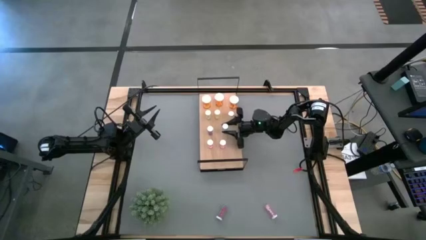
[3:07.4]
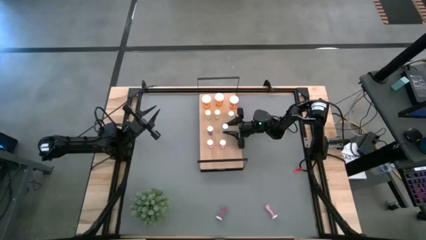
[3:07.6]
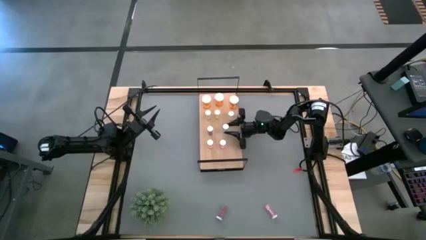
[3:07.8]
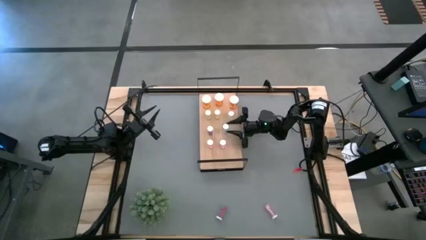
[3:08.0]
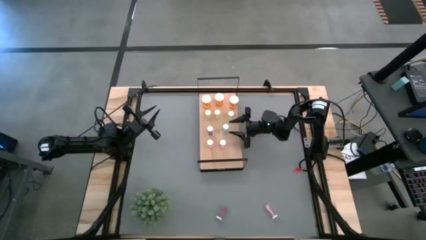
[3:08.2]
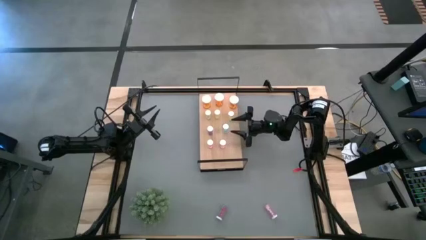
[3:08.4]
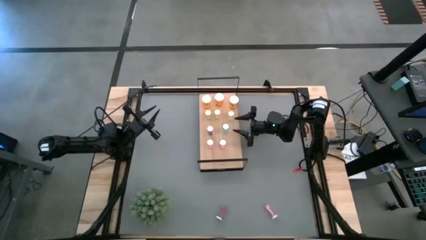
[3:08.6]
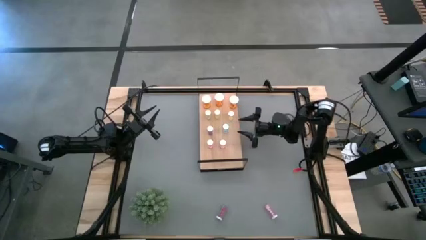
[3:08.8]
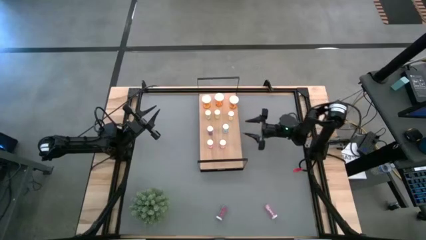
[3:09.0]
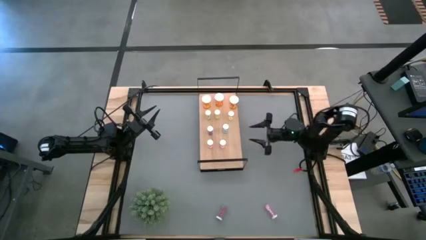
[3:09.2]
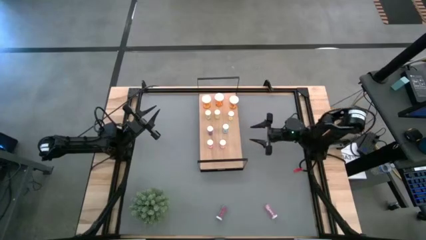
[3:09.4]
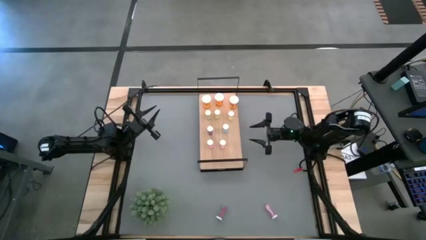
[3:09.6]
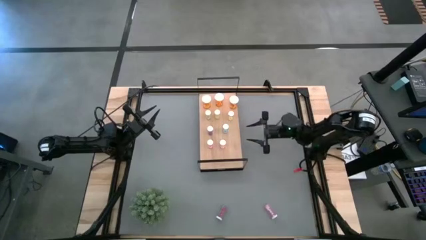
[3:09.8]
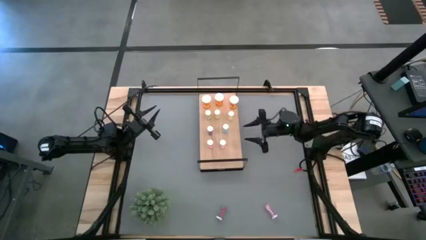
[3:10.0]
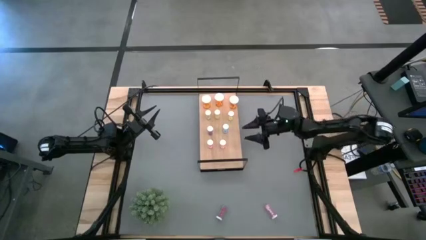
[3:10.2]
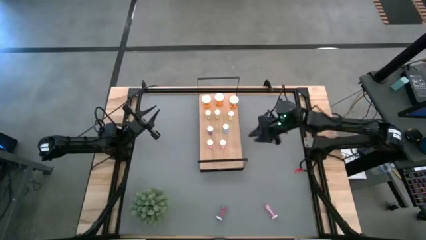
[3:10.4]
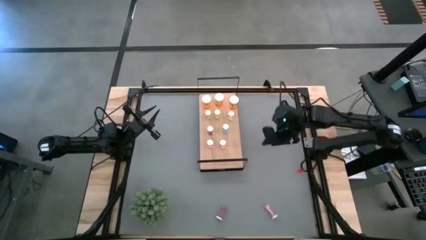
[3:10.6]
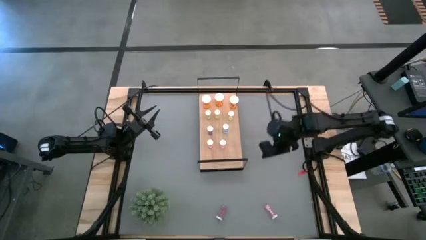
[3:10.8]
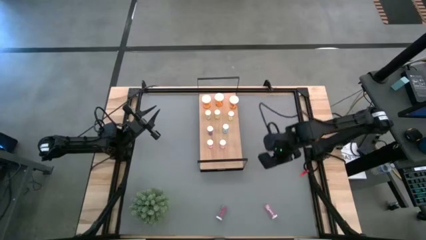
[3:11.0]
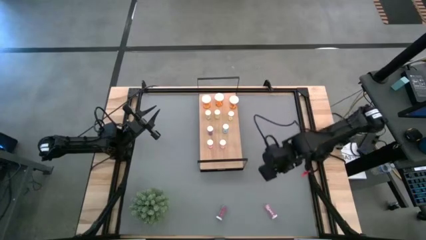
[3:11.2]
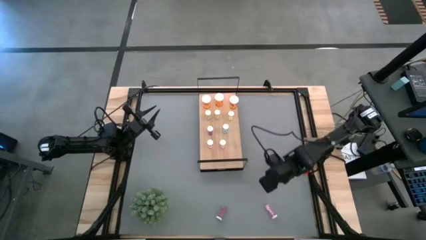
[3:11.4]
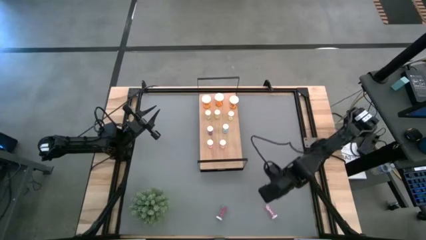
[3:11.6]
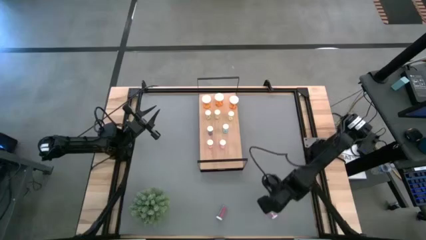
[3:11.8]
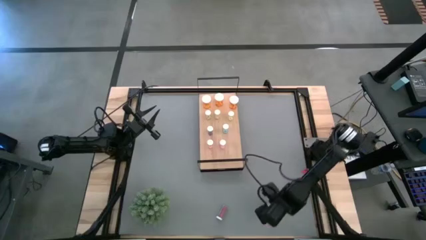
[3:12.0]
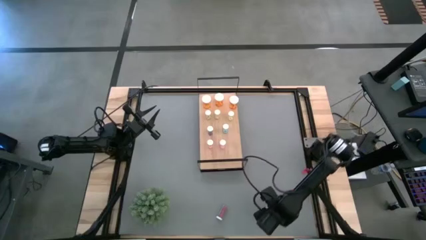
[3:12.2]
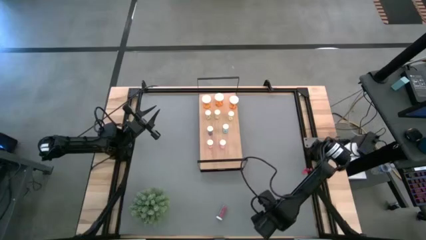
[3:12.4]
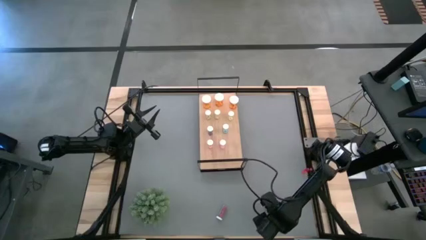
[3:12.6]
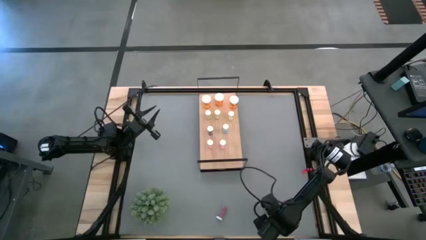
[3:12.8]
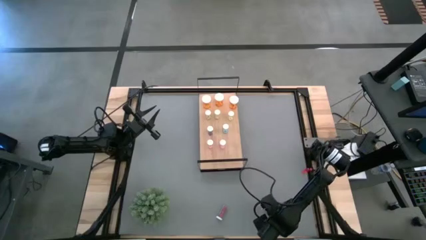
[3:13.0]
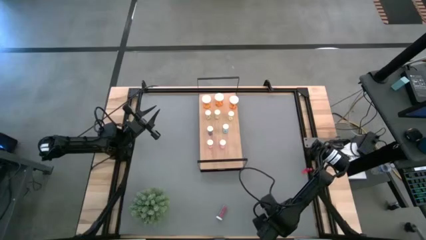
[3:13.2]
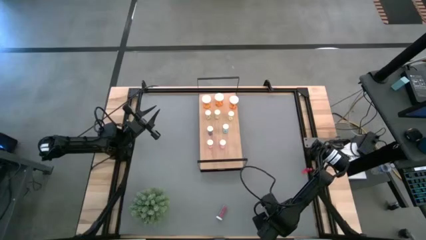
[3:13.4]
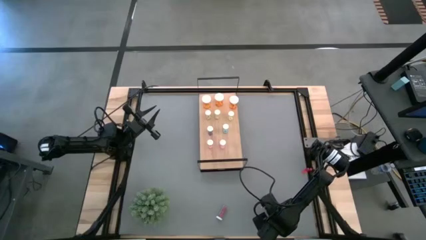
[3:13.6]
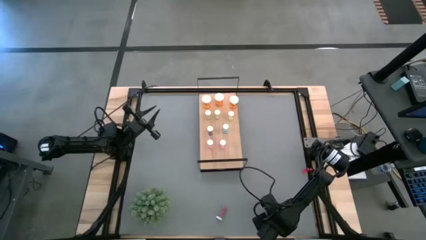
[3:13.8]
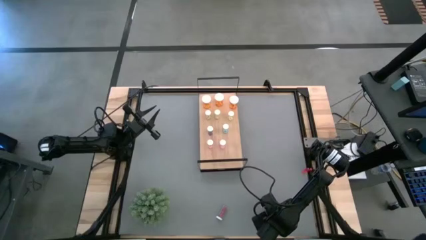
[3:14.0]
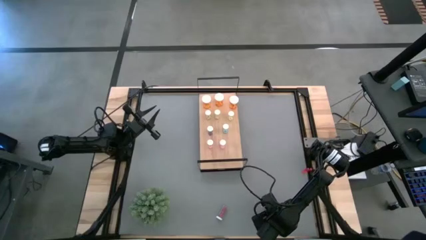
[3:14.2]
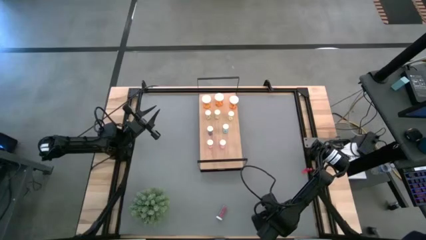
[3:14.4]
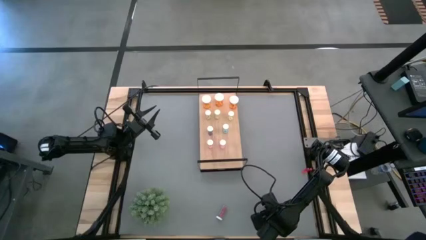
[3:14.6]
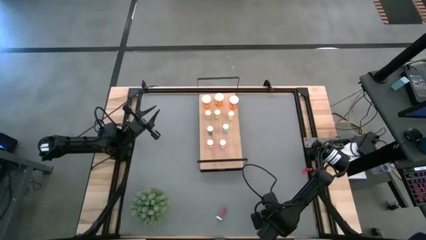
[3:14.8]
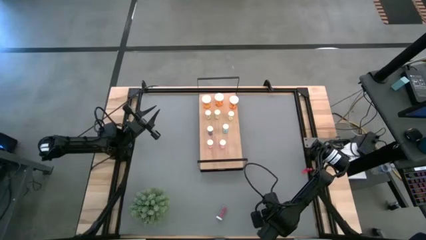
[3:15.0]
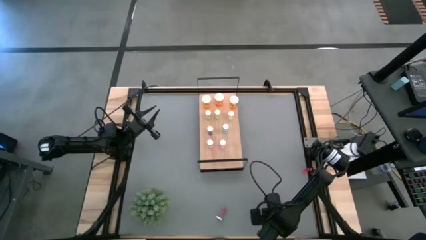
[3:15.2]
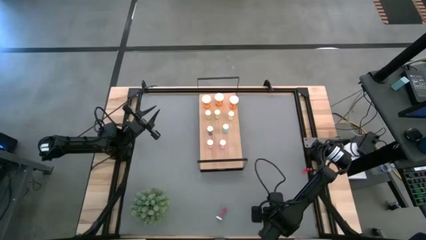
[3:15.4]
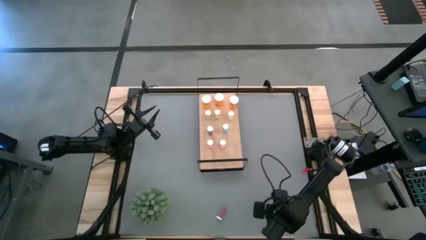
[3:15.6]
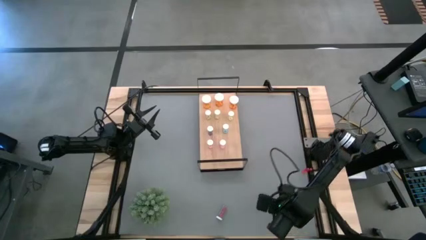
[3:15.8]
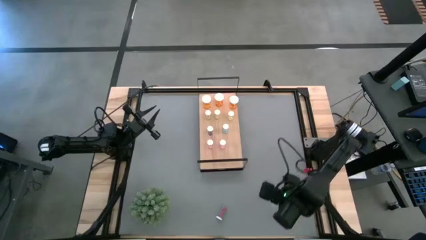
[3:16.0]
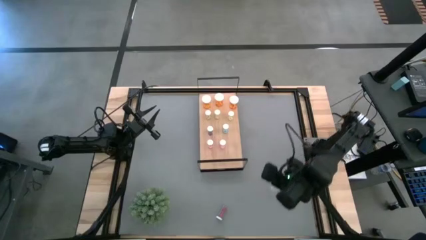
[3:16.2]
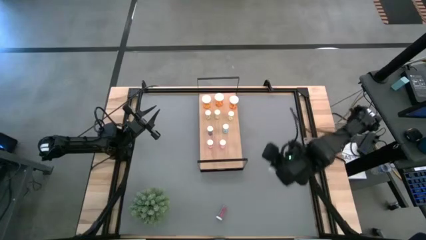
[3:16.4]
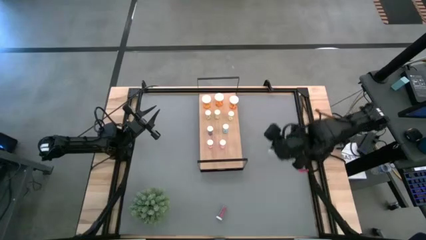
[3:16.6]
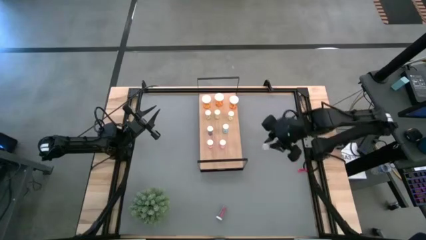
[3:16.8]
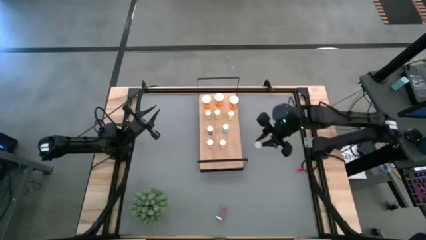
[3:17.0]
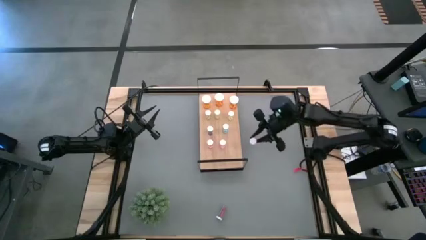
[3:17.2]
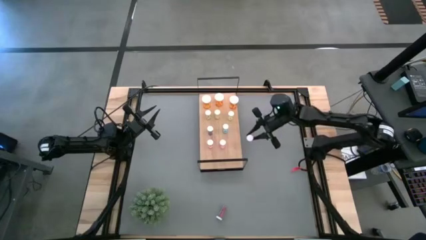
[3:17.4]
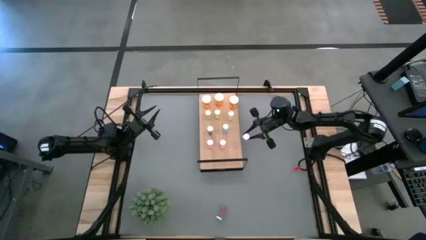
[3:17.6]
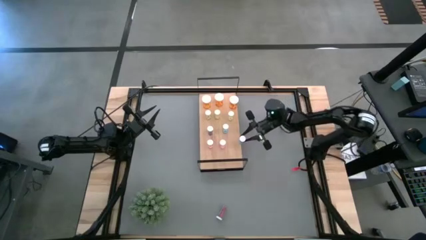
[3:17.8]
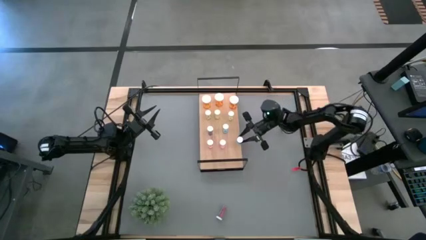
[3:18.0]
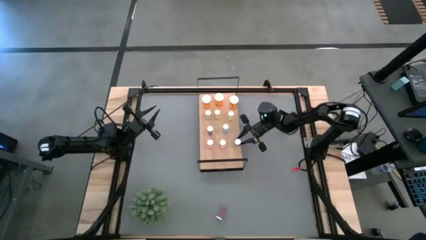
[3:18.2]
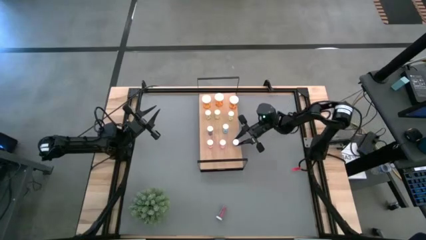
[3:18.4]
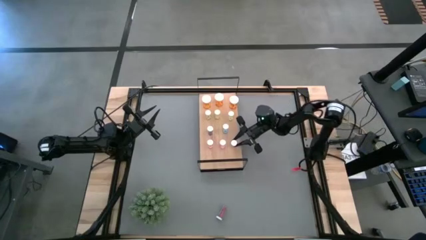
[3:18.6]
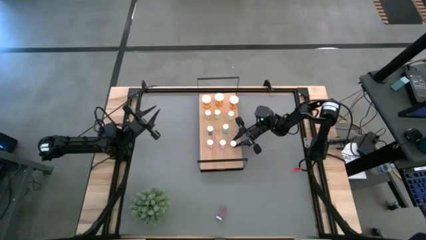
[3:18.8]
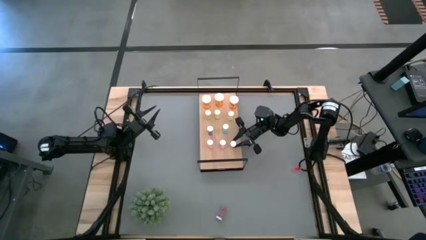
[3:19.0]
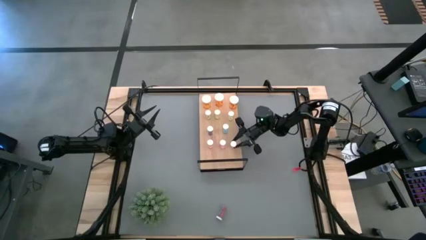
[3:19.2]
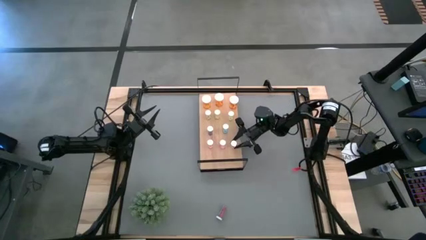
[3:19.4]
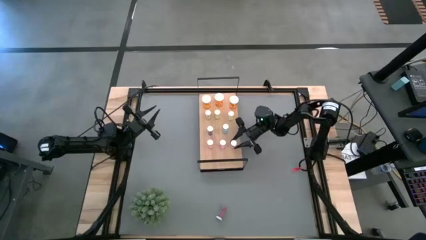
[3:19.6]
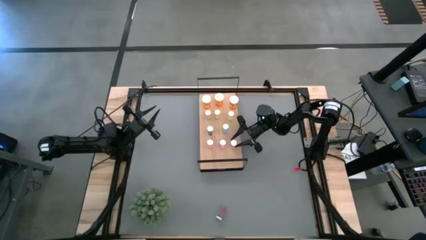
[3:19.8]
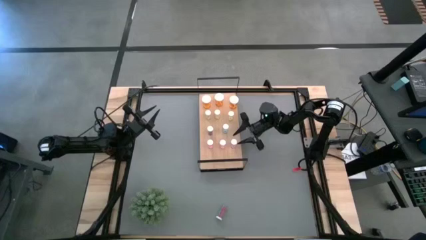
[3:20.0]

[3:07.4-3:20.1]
Task: Pick and place medicine bottles onto shelf by color
Put the pink pill bottle on the shelf aligned with the other pink bottles
